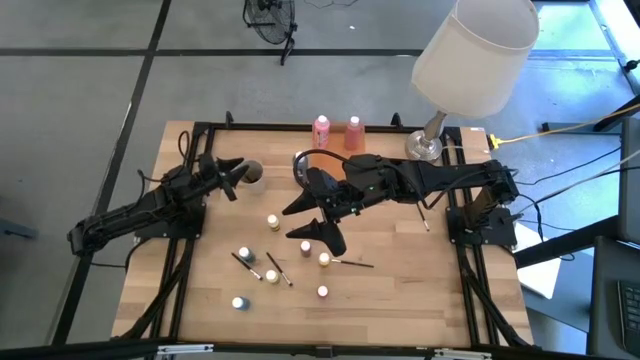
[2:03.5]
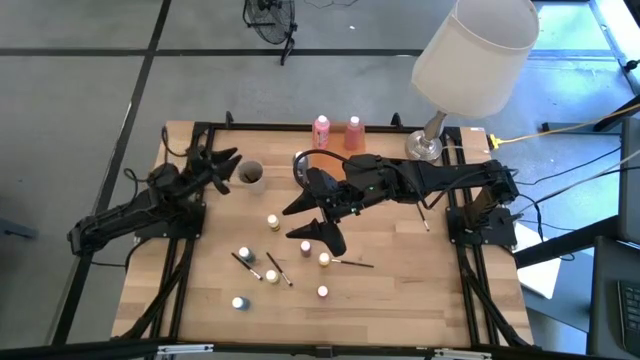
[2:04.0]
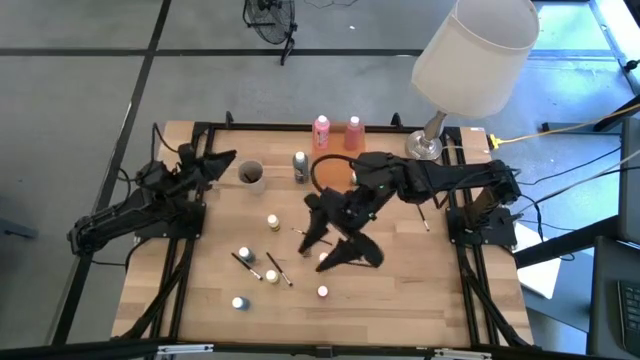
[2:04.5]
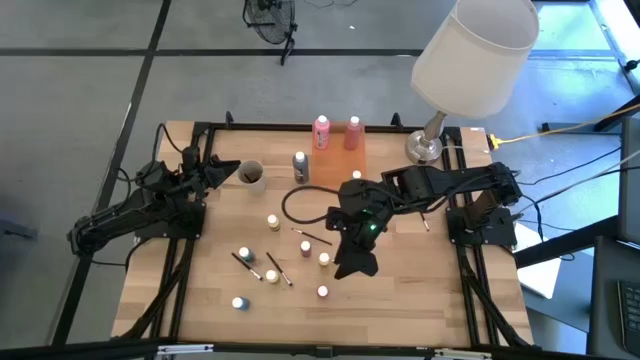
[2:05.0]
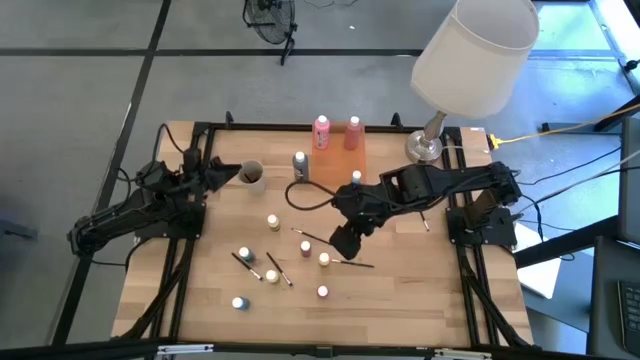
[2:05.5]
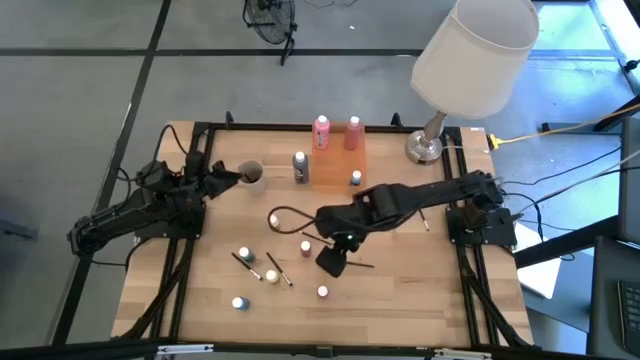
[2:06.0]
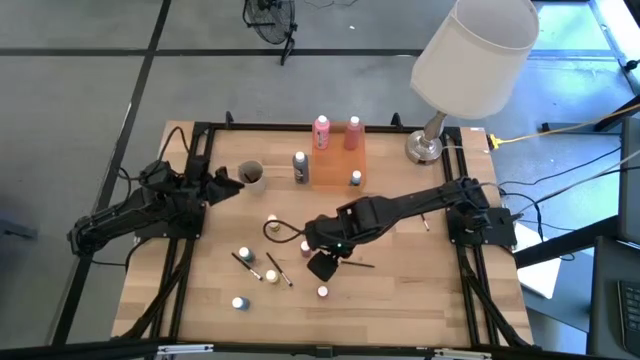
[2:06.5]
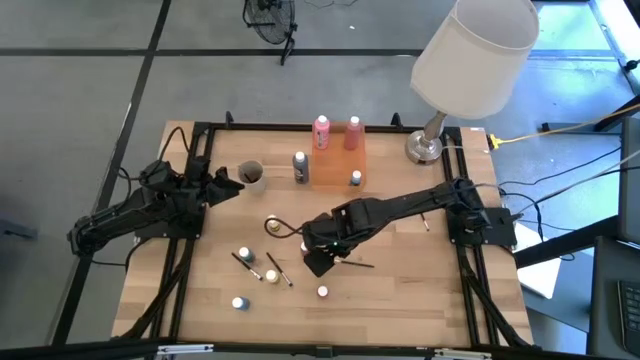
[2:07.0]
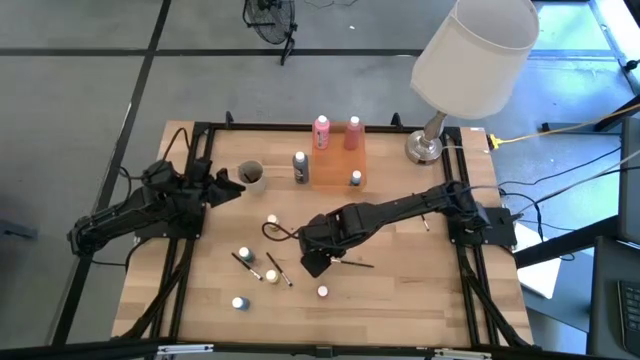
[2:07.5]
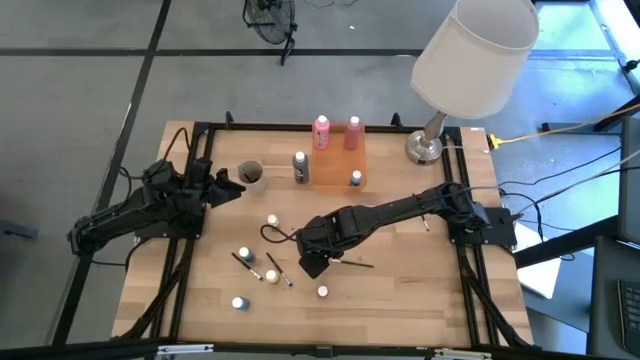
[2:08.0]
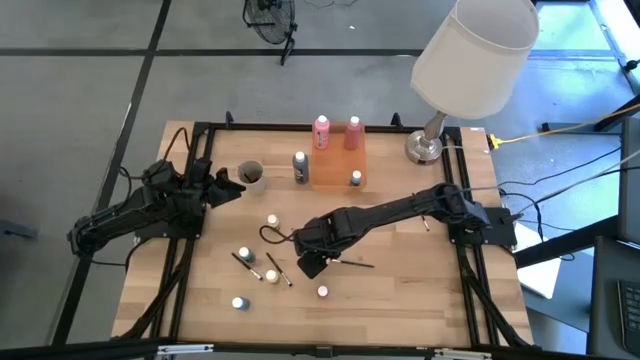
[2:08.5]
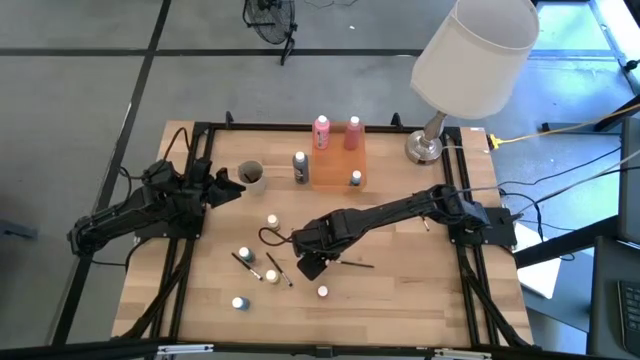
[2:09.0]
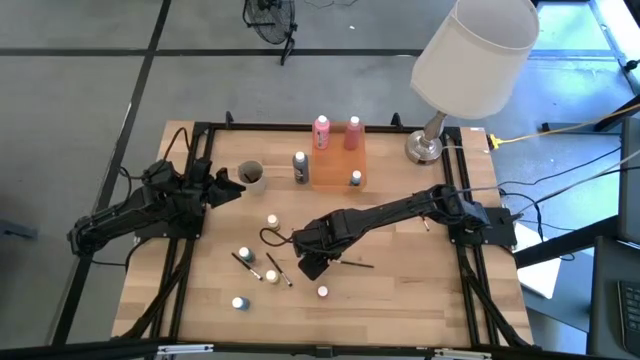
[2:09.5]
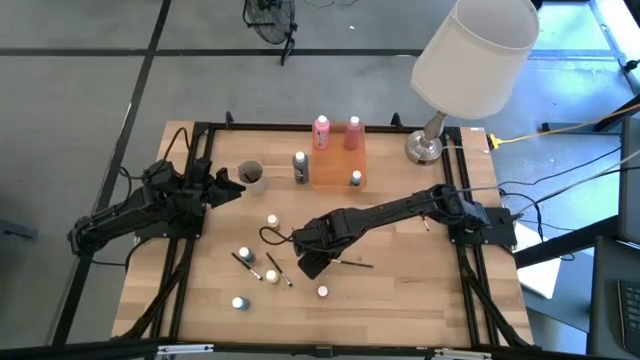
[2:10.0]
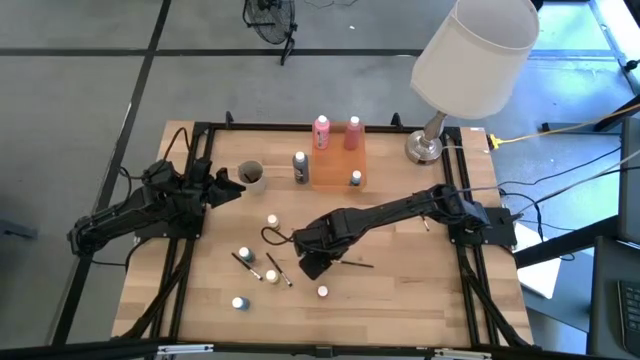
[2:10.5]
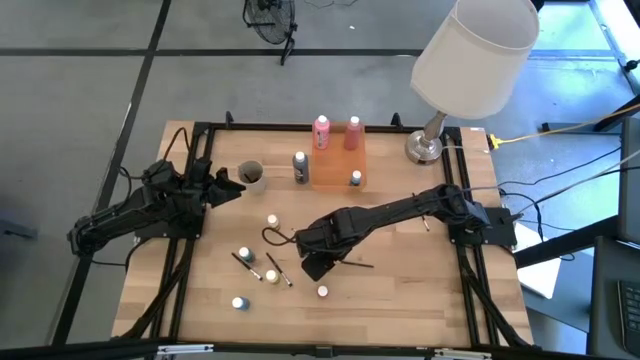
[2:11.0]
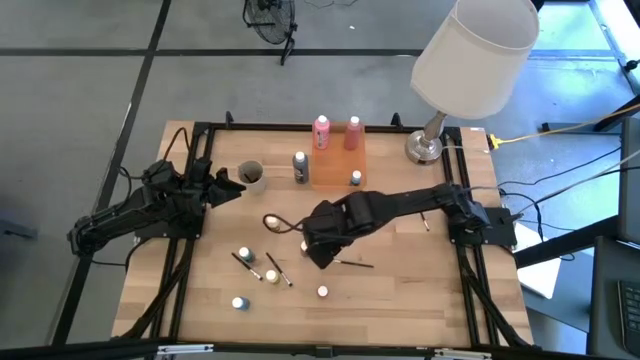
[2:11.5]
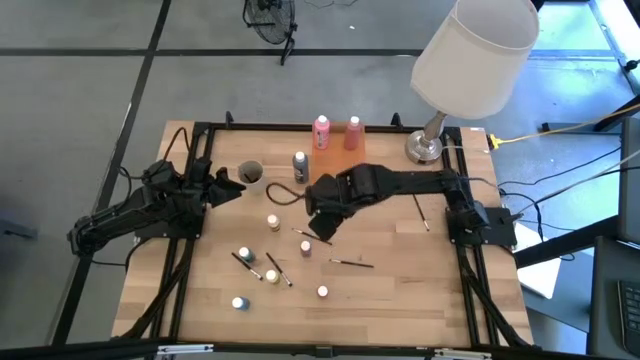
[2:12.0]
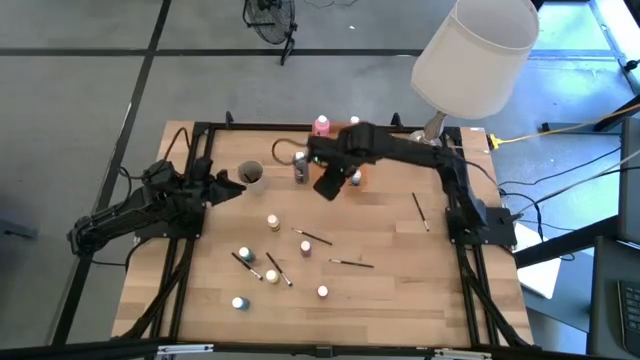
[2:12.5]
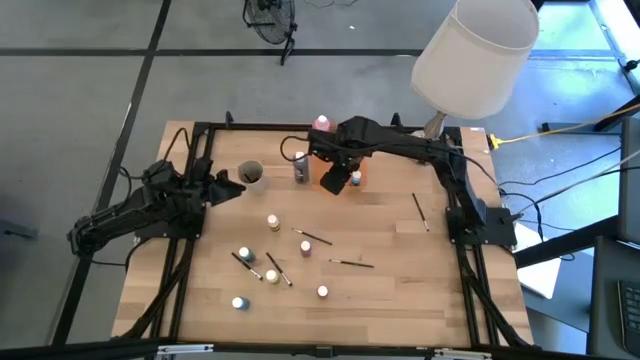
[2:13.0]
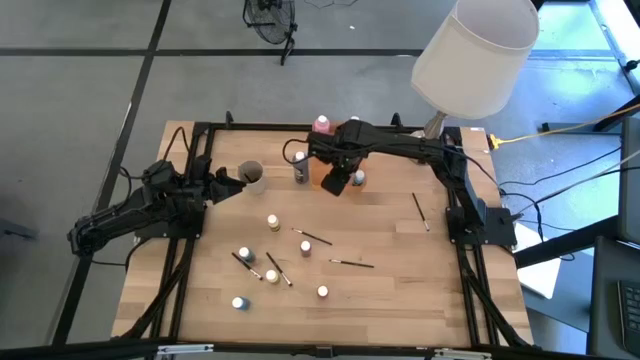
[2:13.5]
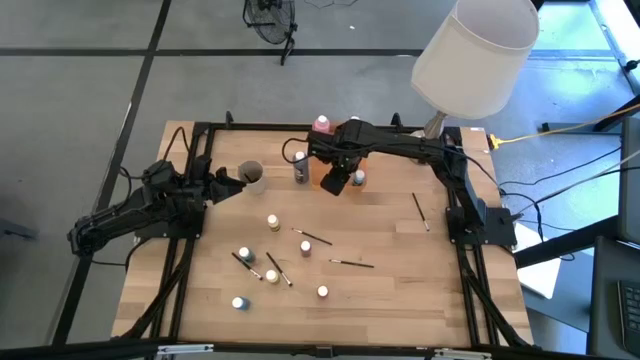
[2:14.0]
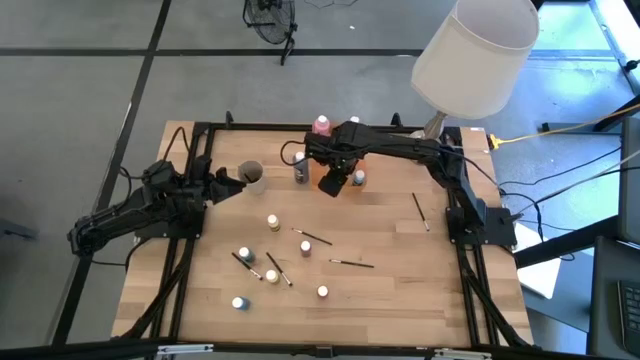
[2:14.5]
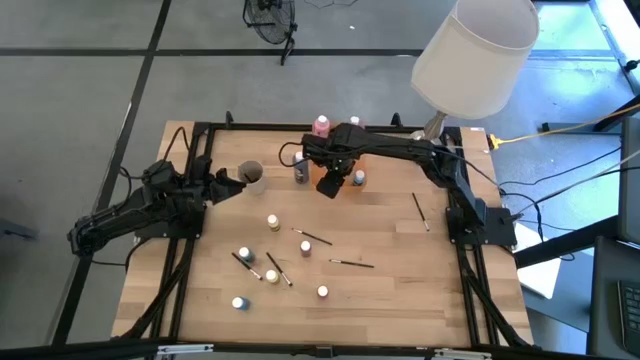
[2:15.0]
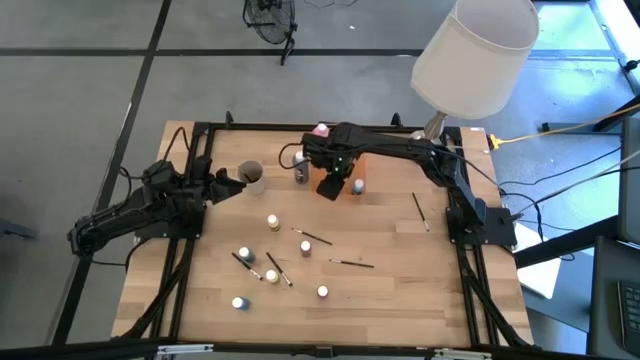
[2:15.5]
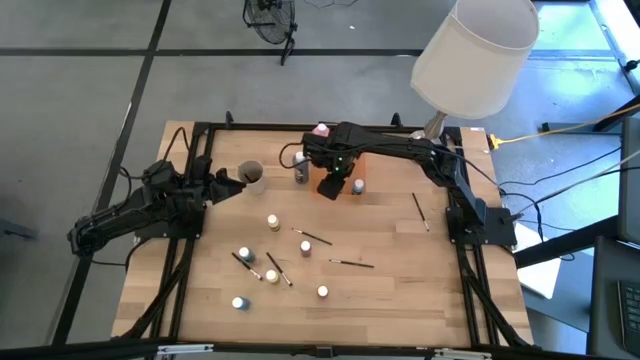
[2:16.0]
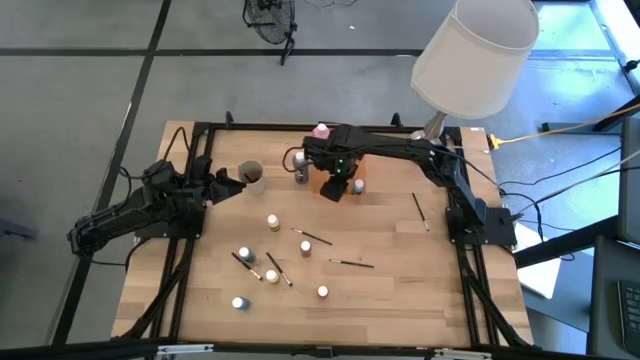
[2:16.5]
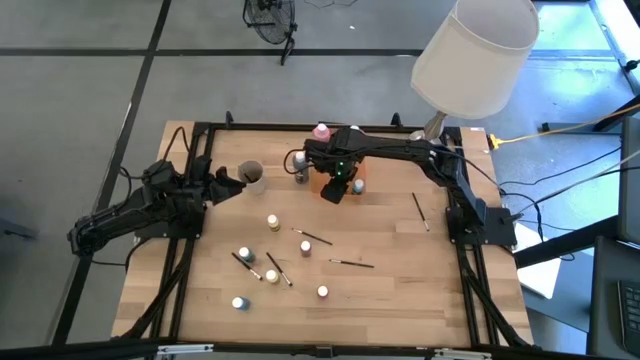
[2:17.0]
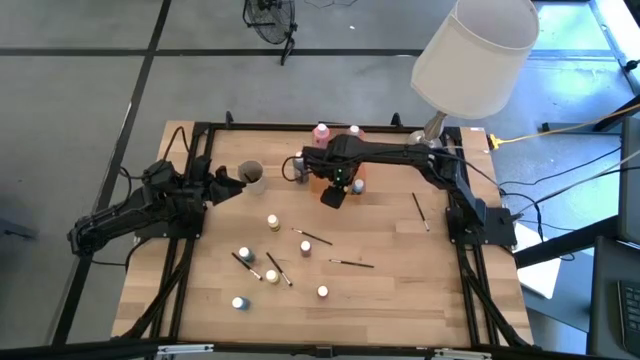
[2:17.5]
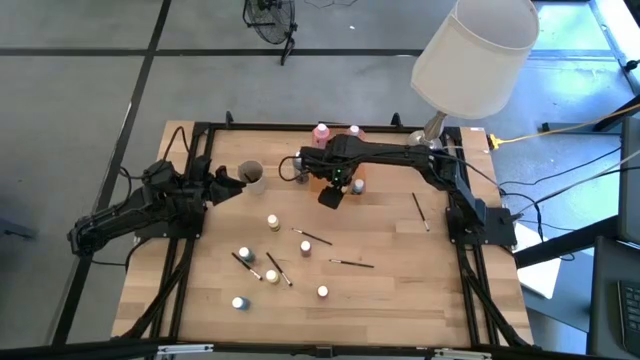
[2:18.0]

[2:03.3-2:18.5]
Task: Pick & Place Paint Supplies
Put the small dark yellow paint bottle into the orange bin

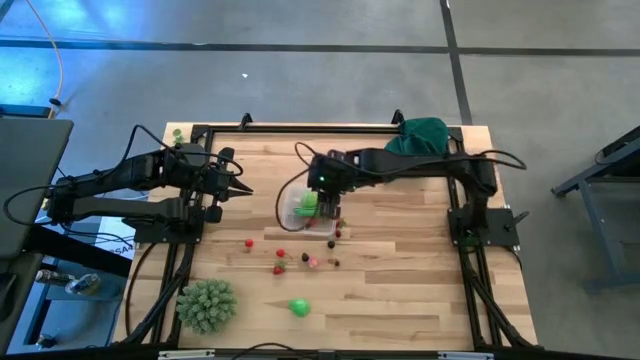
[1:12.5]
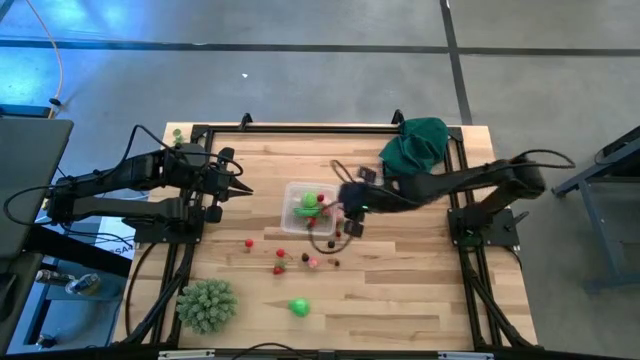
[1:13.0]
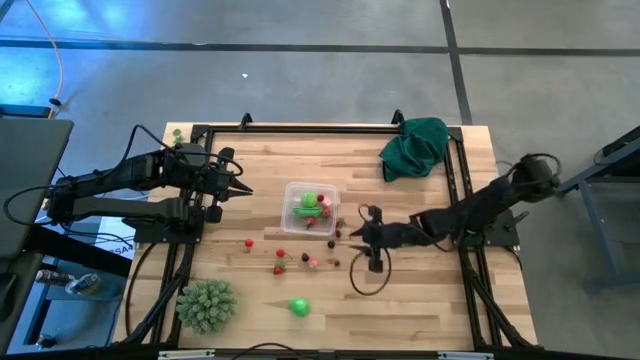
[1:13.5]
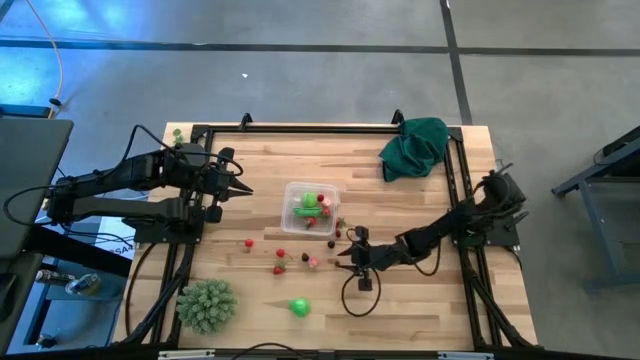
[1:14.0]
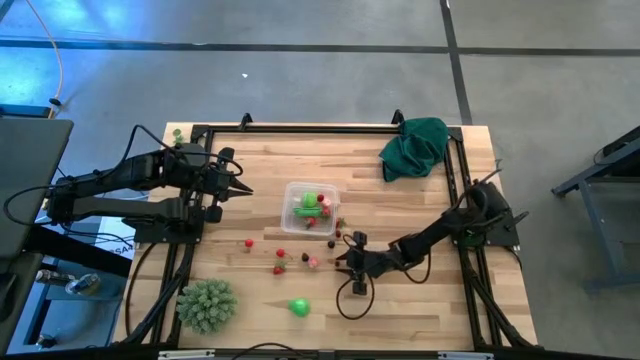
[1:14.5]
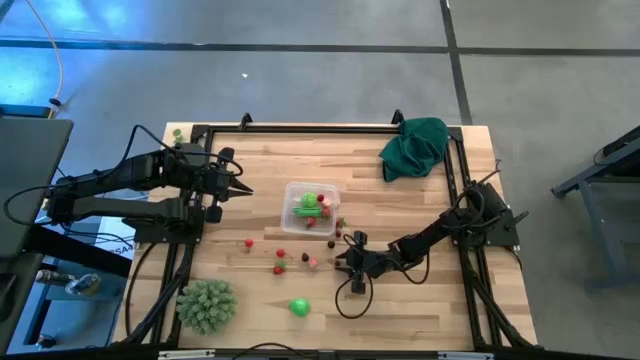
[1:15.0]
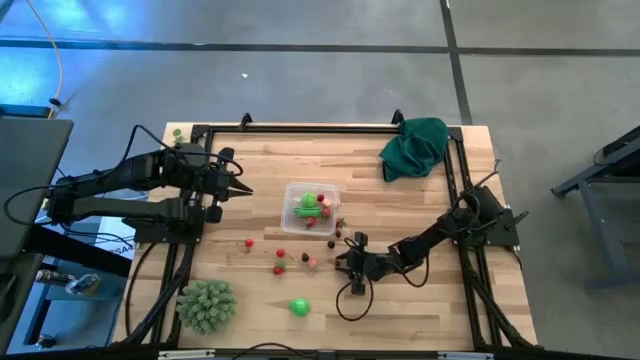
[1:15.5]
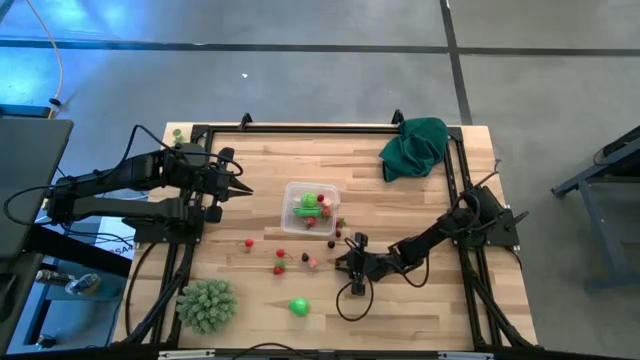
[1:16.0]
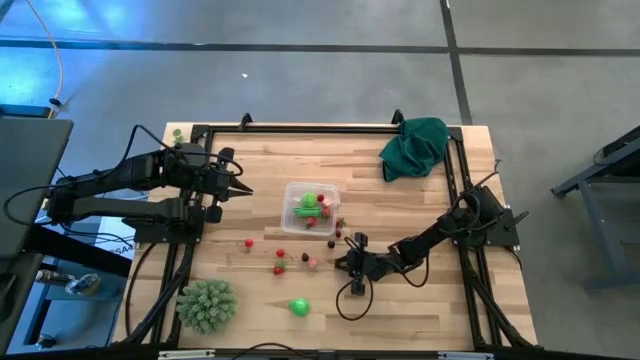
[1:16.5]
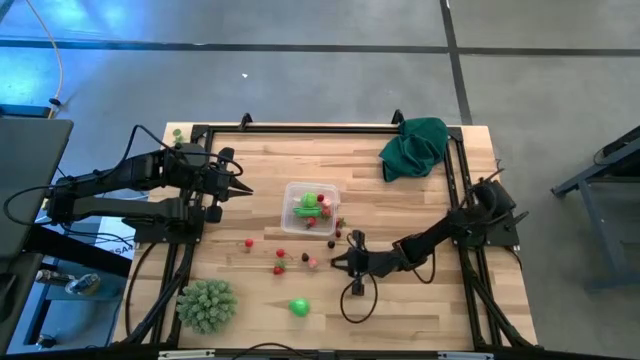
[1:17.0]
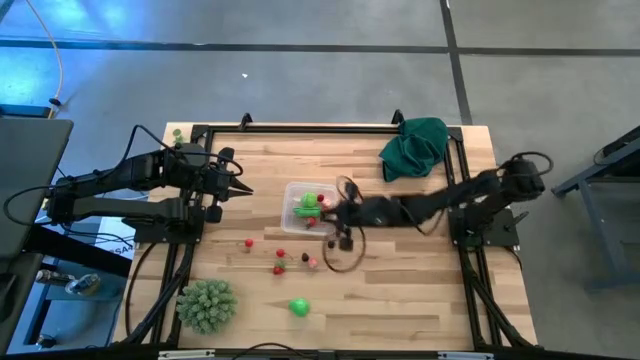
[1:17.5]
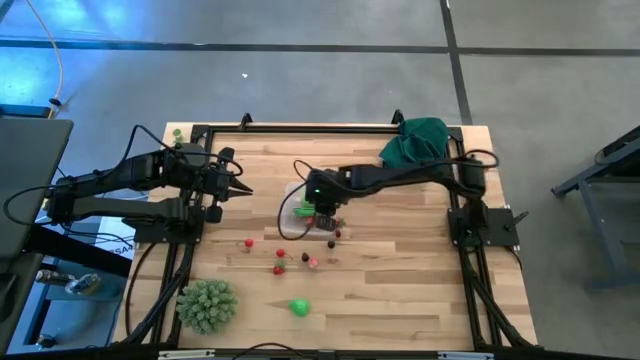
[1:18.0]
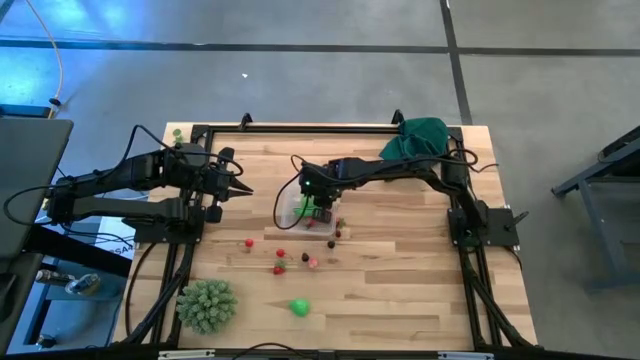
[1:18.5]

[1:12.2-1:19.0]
Task: Pick and placing Produce into tupperware
Put the blueberry into the transparent container

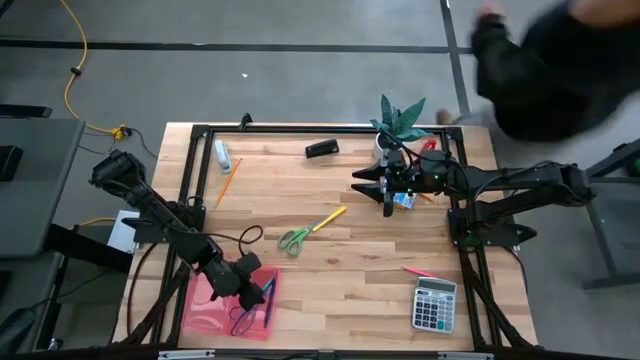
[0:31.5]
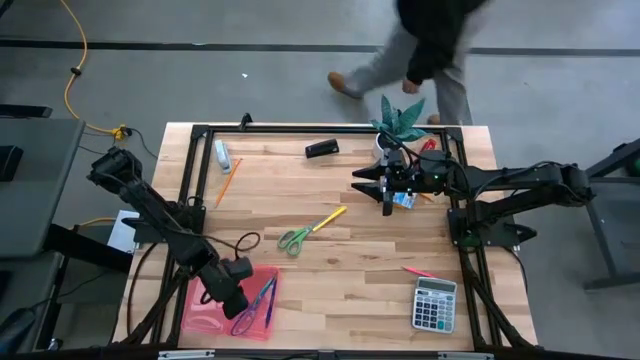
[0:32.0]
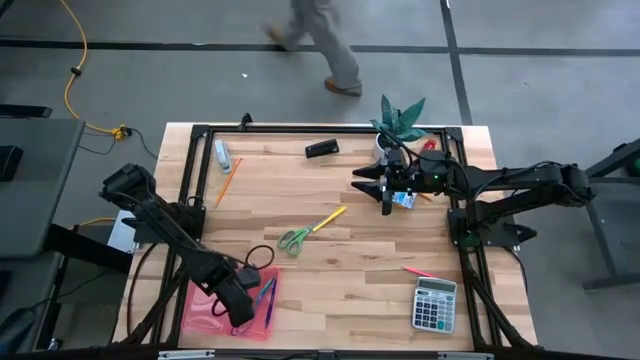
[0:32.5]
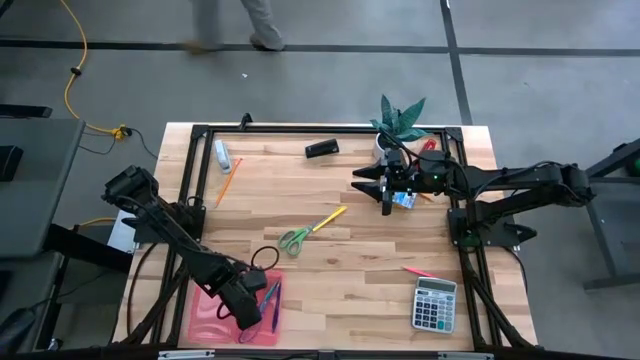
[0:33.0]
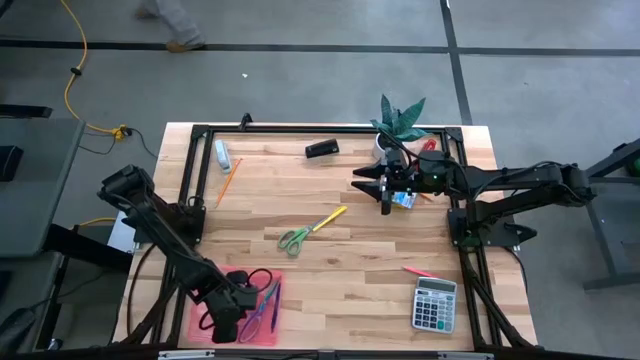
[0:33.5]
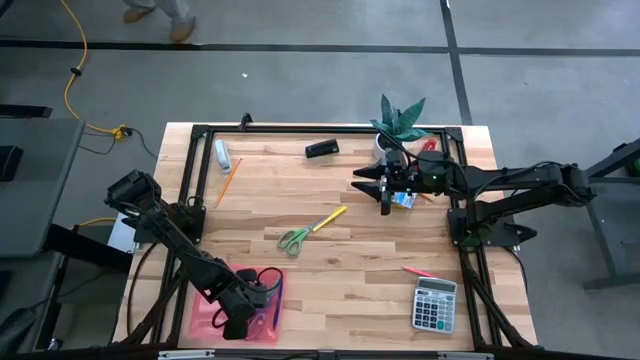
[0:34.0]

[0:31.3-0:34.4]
Task: Pack school essentials
Adjust the purple scissors in the supply box
